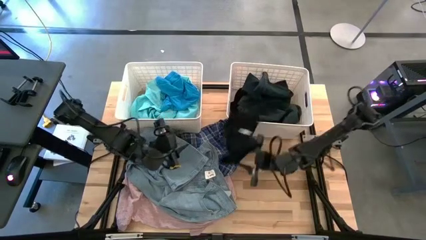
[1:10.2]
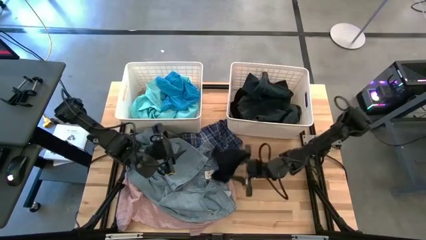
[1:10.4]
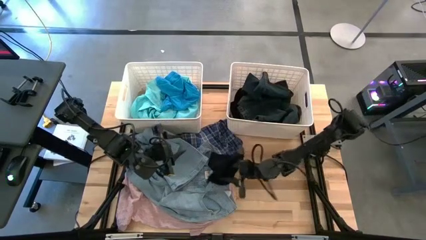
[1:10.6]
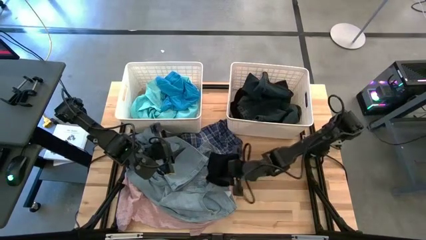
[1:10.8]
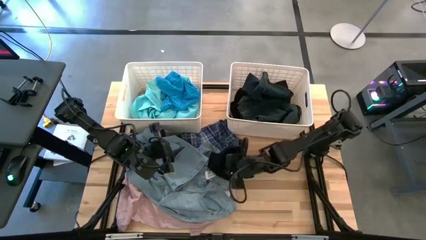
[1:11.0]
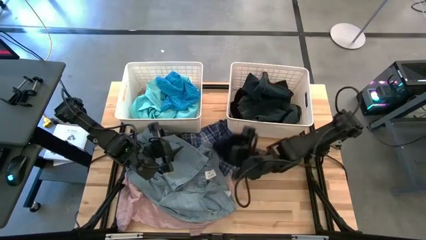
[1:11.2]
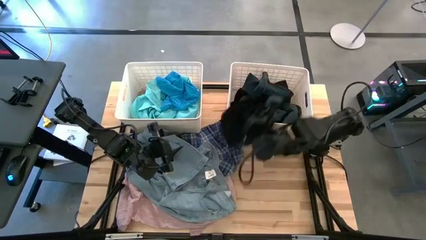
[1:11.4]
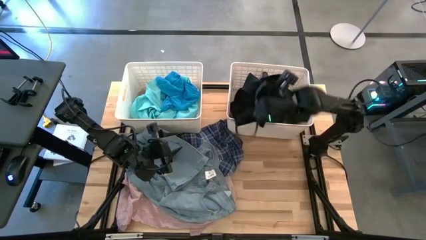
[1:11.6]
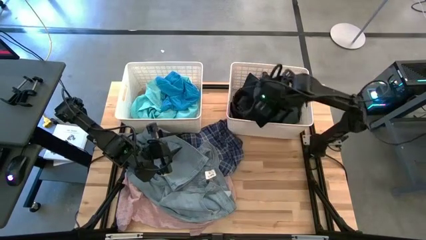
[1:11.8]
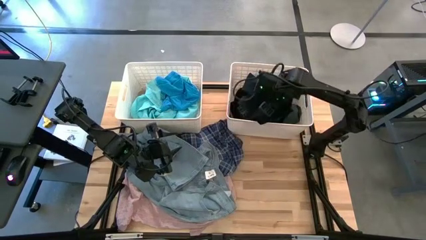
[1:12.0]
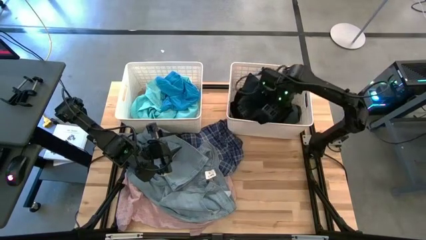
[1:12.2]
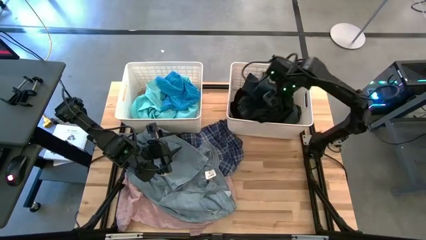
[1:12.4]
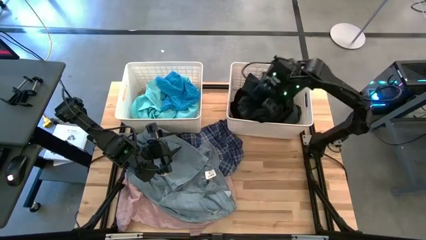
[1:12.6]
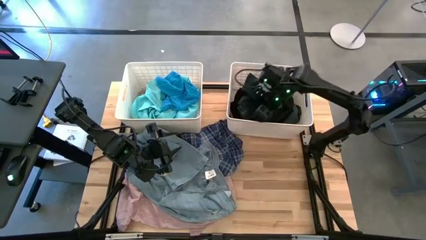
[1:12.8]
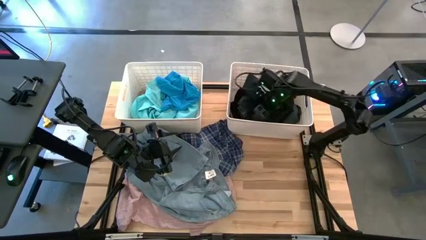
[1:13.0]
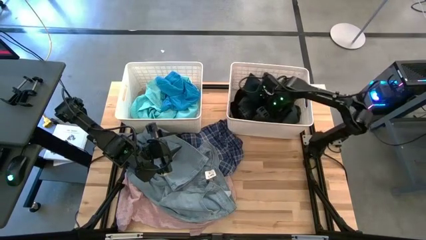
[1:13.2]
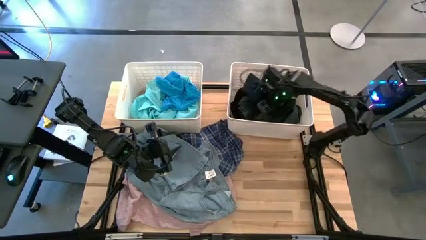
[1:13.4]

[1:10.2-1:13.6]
Task: Sort clothes
Put the black boxer into the right white bin

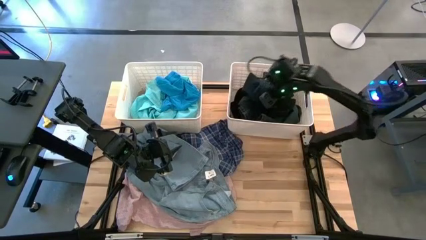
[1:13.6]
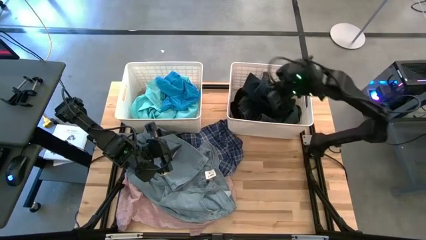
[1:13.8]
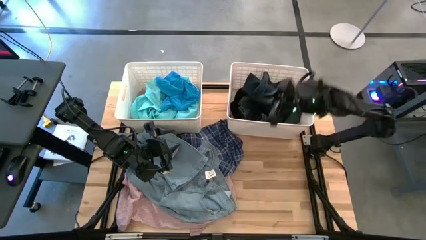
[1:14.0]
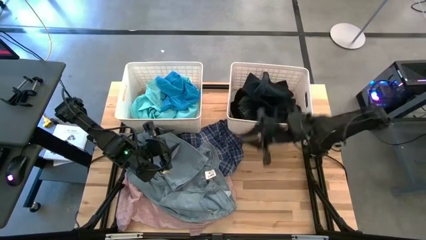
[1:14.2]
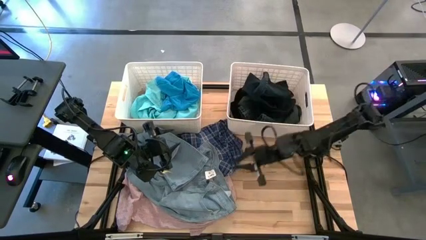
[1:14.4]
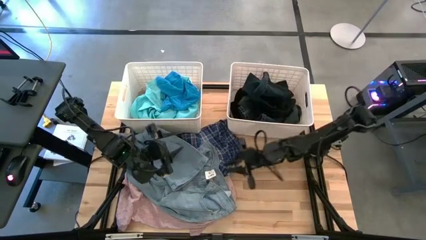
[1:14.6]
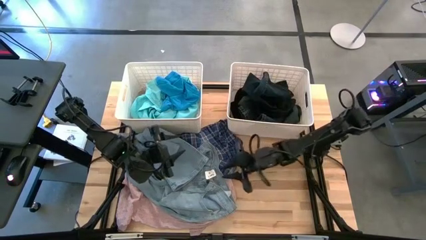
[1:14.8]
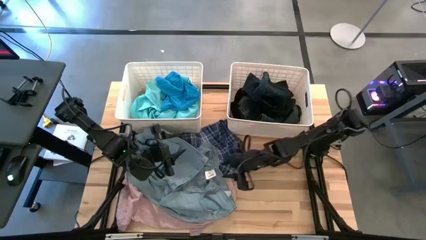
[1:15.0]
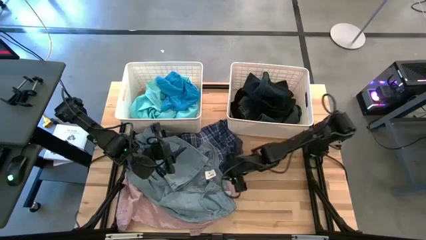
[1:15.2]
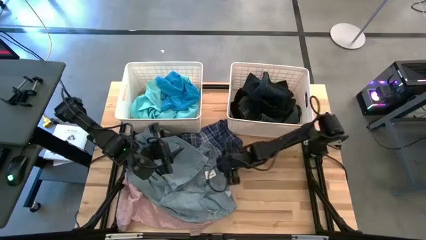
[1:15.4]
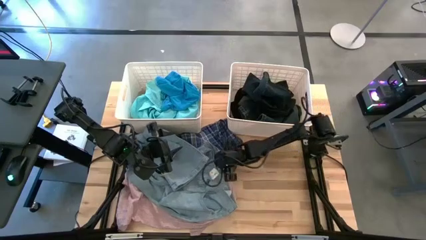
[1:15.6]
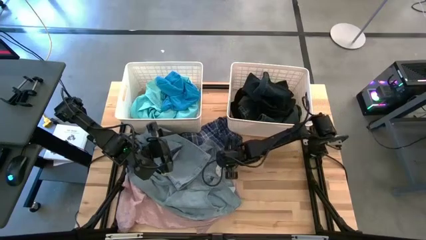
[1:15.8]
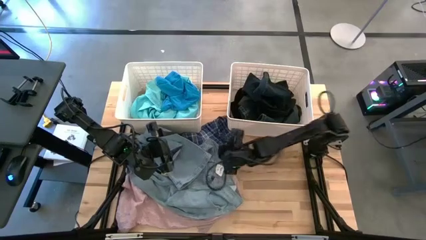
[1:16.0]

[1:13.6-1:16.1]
Put the blue/white pants into the right white bin

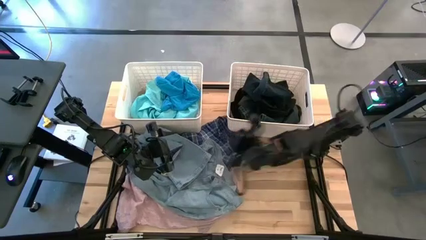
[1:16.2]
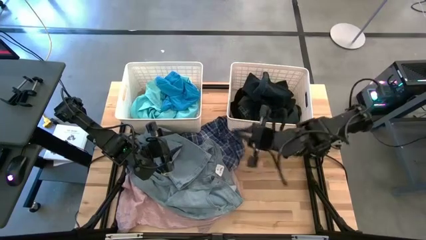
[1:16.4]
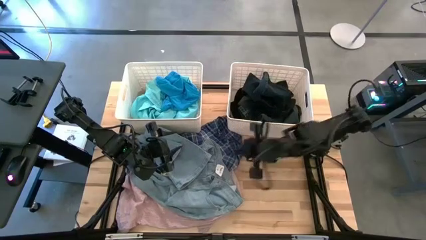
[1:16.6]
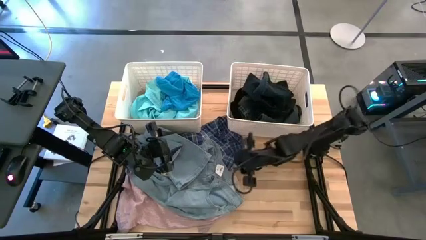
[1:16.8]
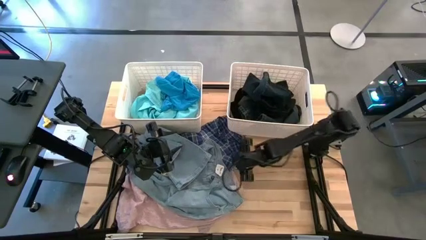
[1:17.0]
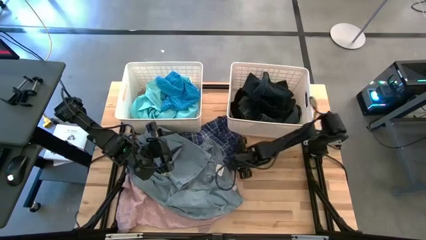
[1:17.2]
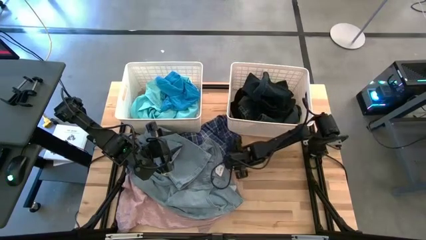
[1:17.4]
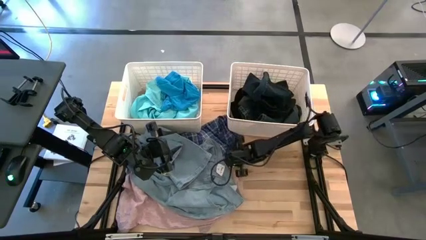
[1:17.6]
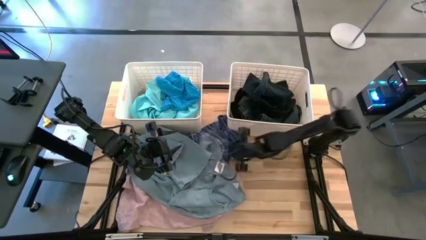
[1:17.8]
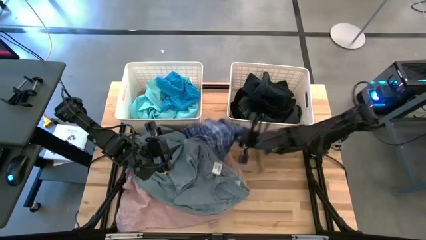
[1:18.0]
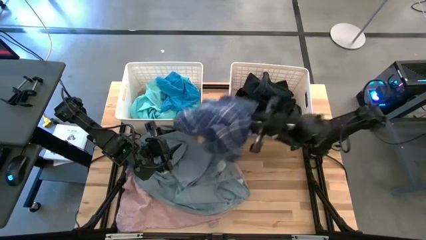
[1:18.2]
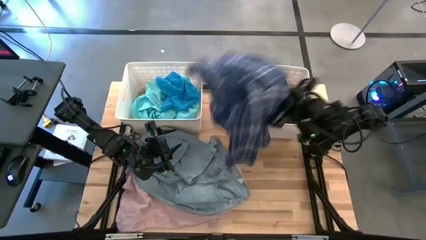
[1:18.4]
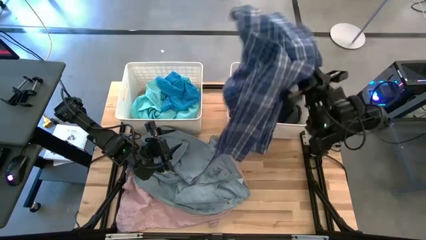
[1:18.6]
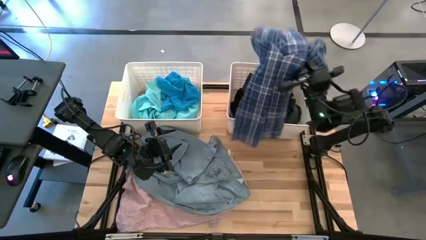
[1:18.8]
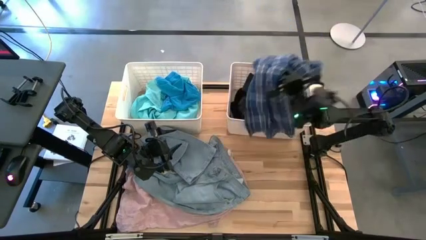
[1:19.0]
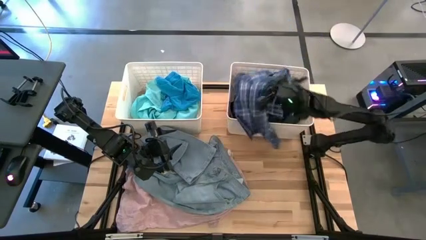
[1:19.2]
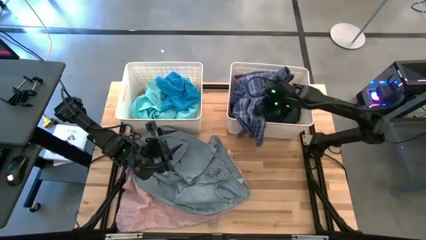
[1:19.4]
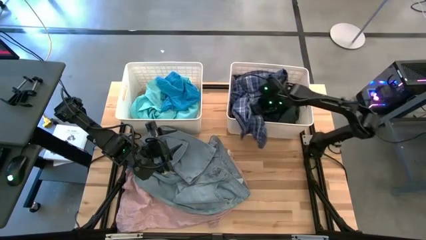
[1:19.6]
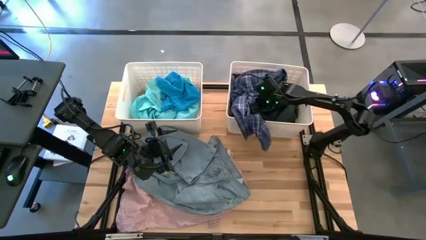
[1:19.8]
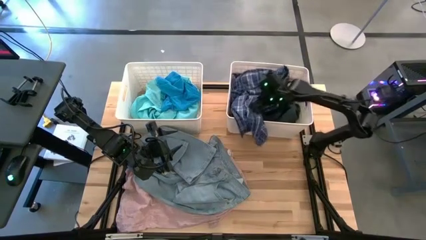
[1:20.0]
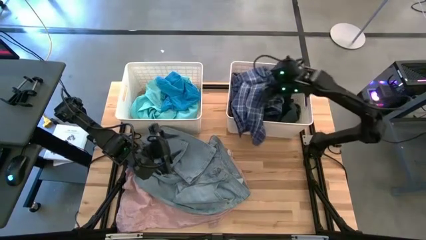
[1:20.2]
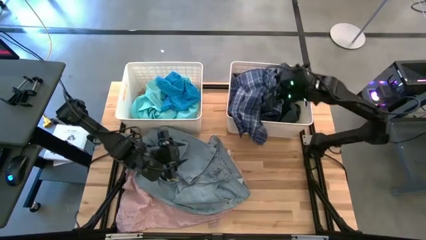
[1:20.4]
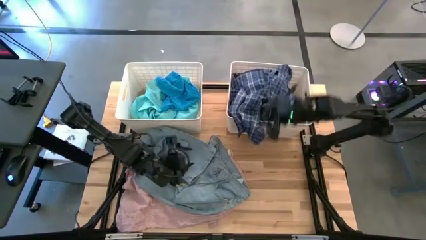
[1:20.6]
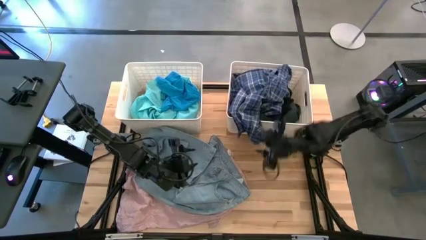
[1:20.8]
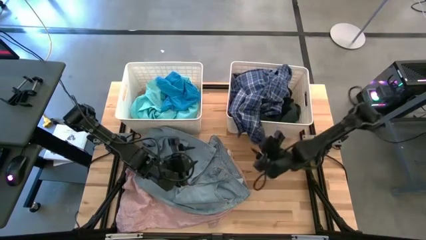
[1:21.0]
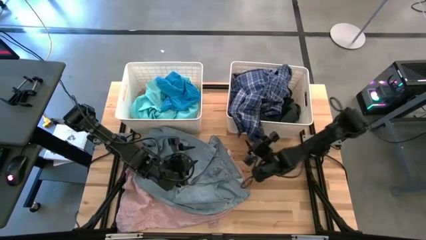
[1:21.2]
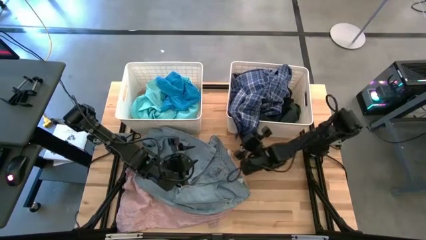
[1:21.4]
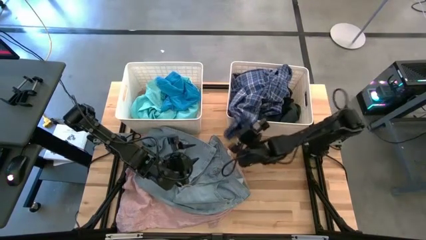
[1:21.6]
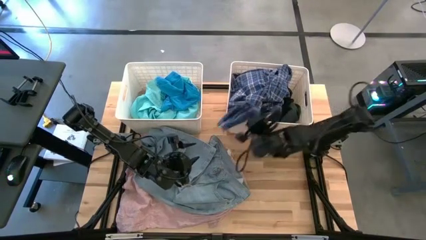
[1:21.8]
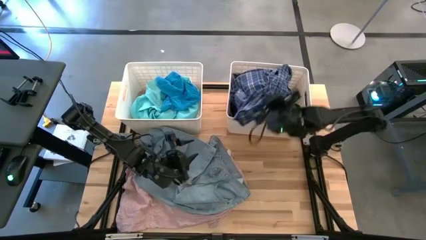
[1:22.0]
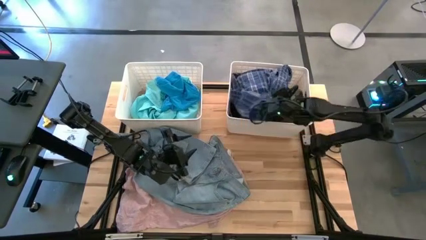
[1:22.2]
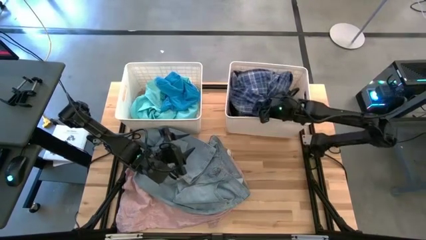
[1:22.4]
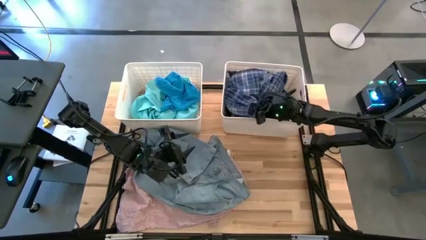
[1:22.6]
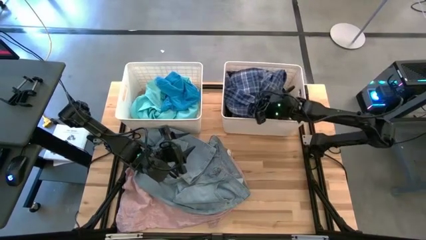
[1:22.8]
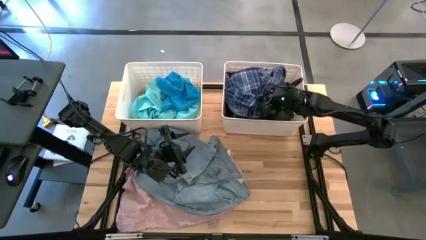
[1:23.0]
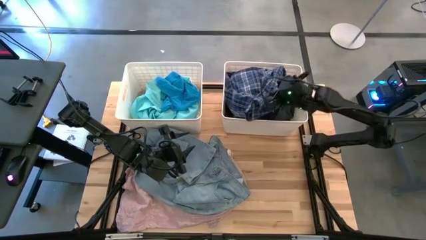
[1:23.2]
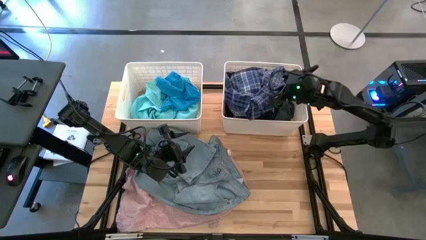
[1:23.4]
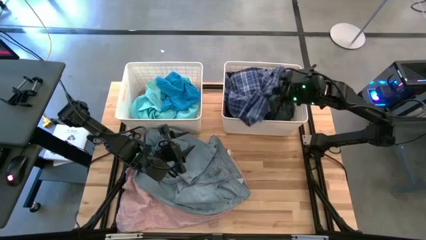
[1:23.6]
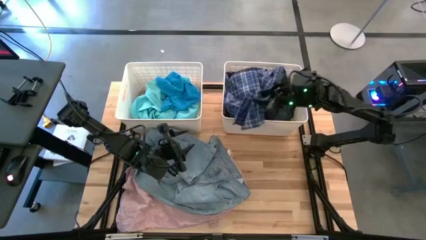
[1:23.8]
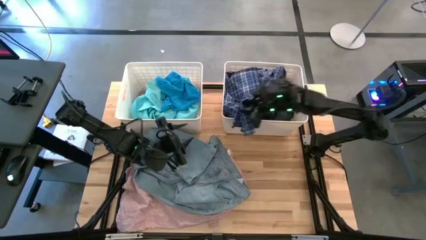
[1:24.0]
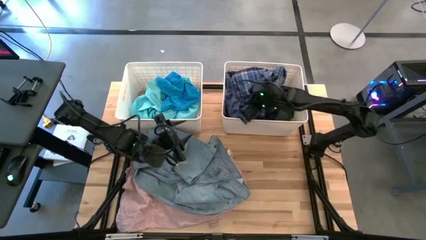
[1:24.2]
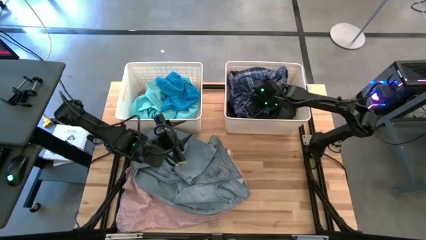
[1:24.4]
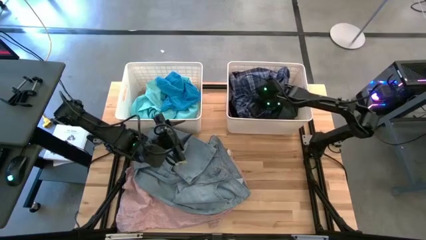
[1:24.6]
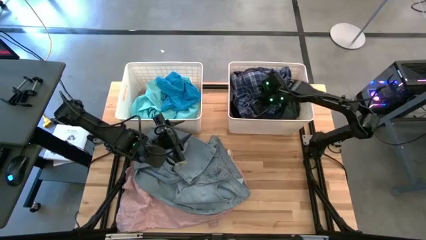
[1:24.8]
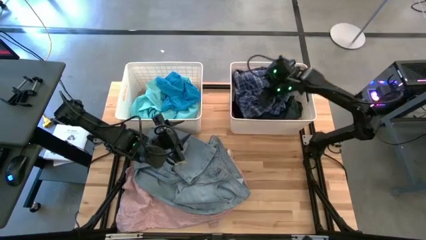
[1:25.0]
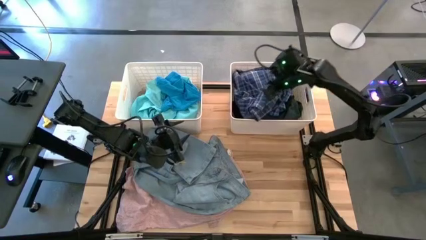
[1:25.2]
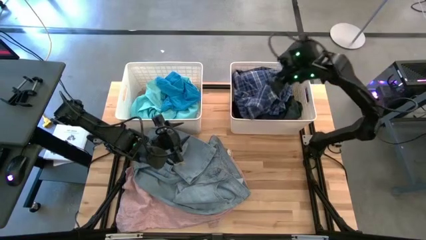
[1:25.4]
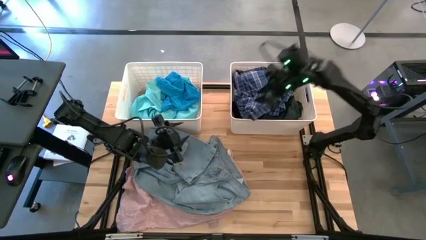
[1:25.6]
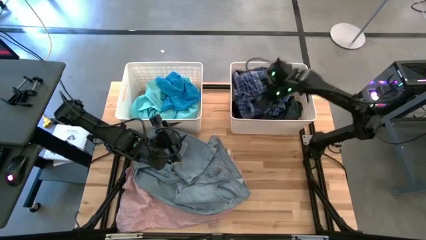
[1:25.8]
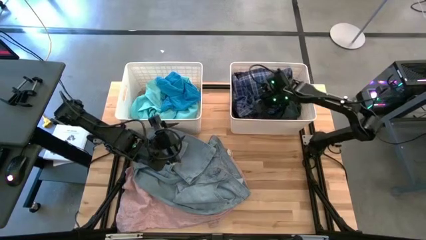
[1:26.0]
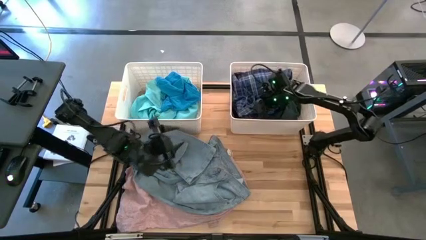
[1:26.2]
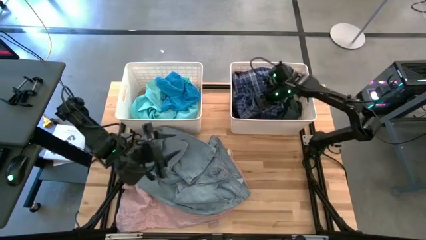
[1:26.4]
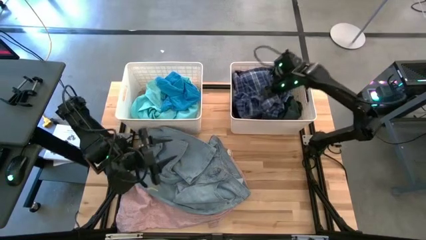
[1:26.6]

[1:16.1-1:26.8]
Put the blue/white pants into the right white bin
